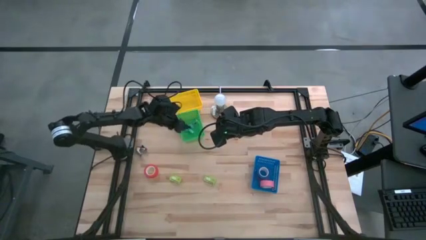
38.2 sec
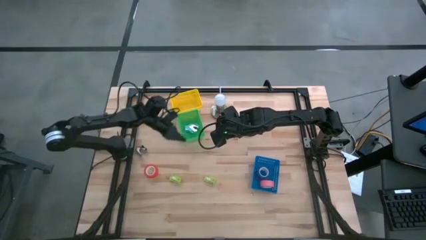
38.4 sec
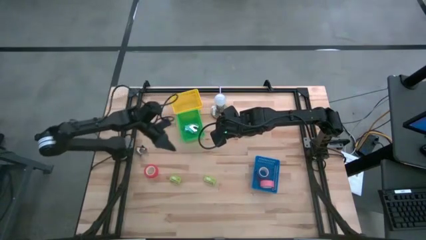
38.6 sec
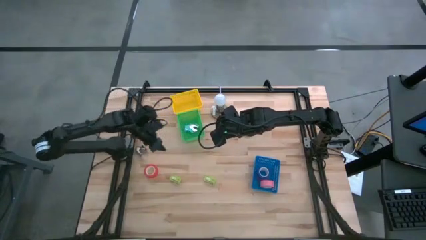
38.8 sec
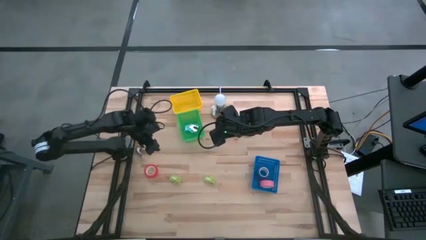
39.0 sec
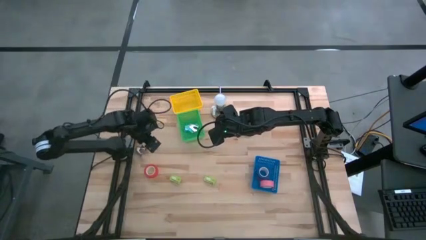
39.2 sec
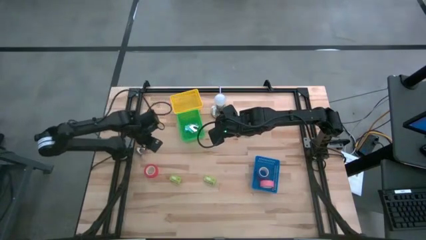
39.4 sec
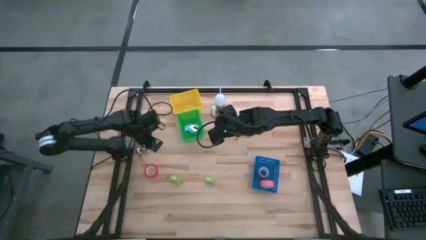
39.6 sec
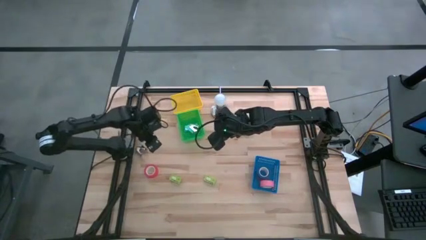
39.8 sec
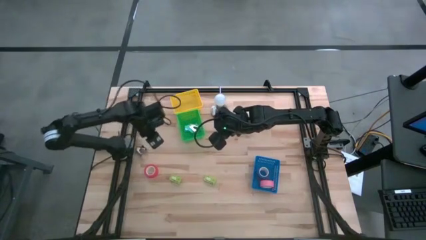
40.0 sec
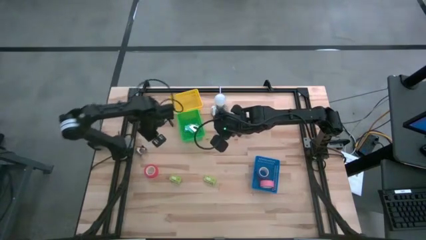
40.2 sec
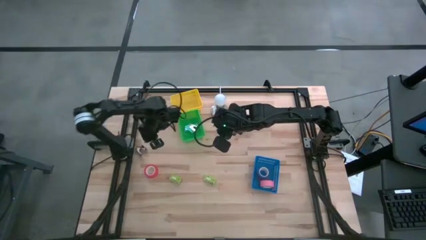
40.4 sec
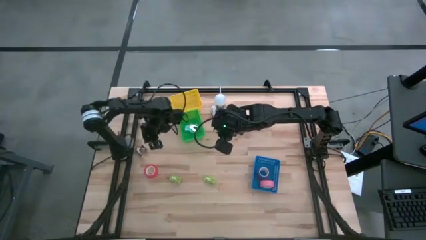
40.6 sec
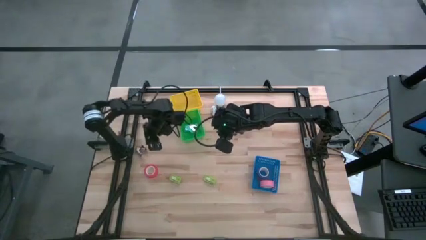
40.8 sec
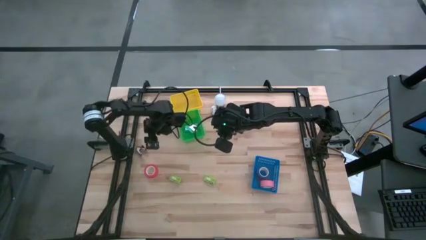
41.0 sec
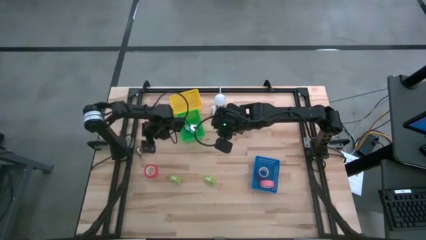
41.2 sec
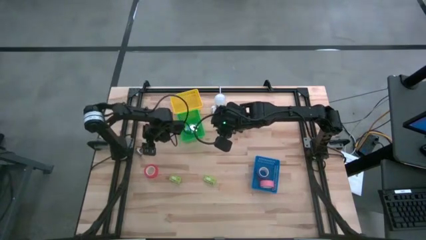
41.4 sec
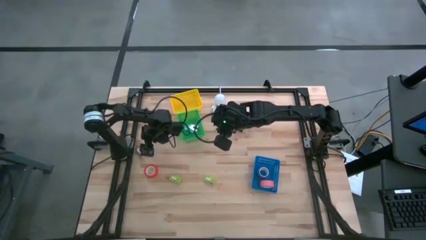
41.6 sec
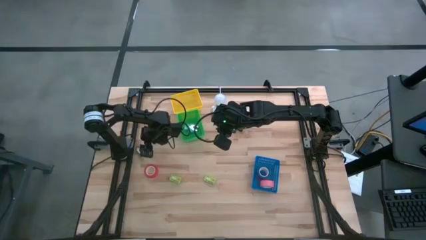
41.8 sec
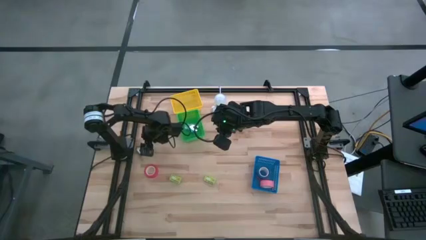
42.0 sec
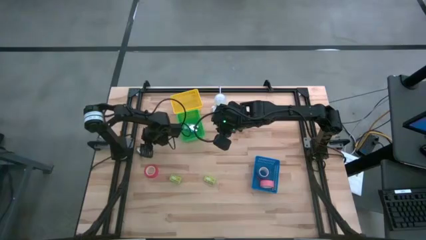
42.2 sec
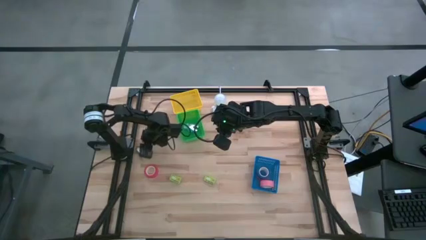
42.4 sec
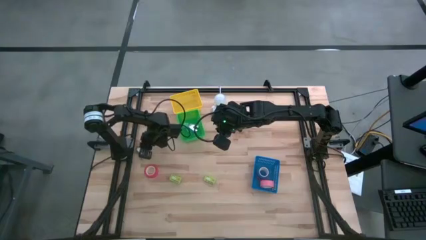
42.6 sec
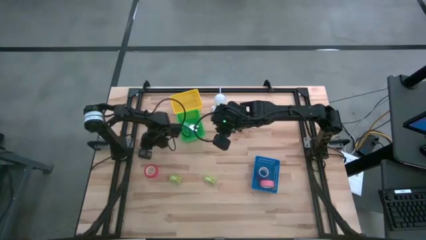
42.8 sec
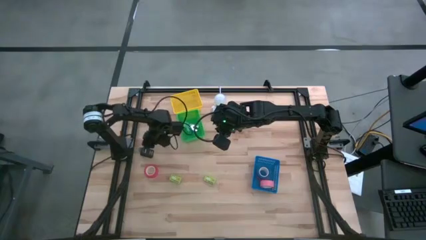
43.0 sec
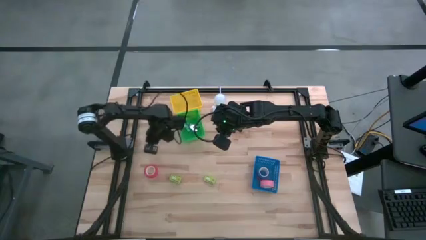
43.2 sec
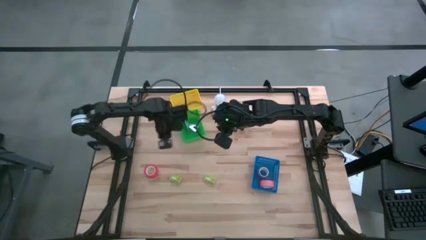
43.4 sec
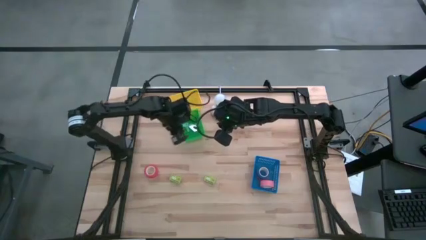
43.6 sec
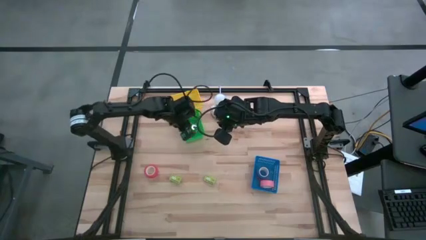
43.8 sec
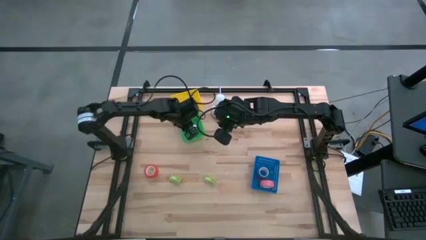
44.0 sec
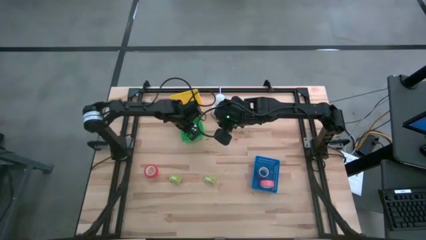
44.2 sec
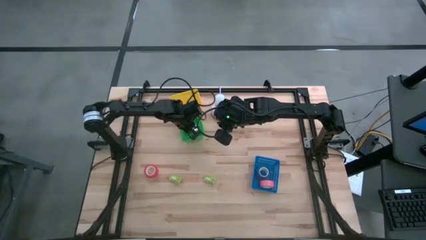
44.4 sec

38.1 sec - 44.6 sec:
Task: Pick and place Stapler, Stapler remover, tape
Put the dark gray staple remover into the green bin

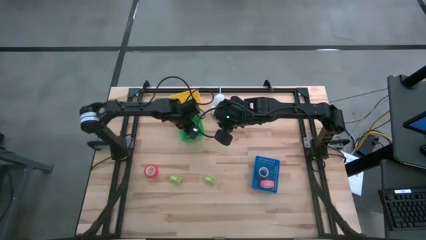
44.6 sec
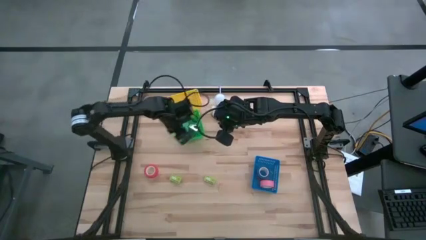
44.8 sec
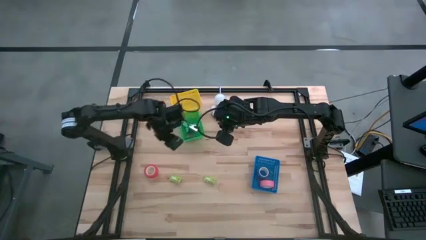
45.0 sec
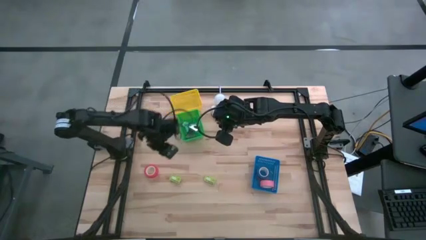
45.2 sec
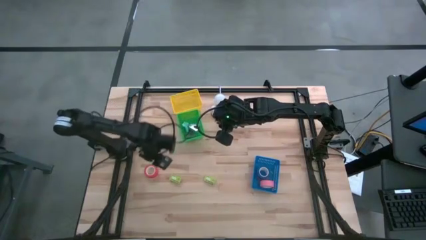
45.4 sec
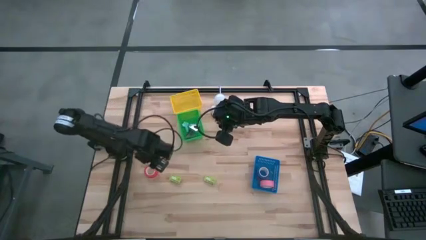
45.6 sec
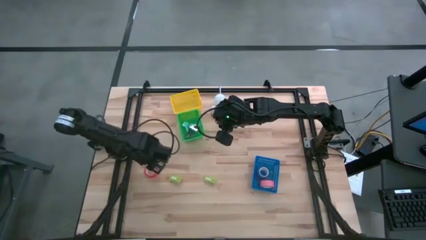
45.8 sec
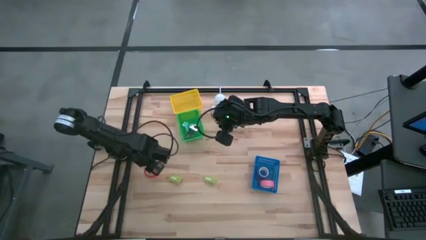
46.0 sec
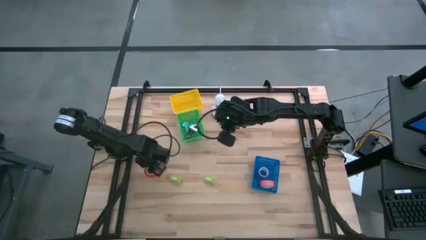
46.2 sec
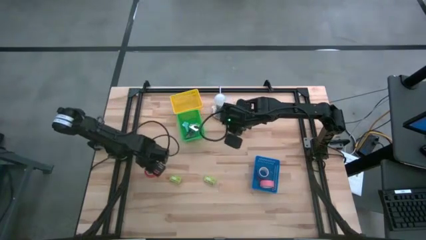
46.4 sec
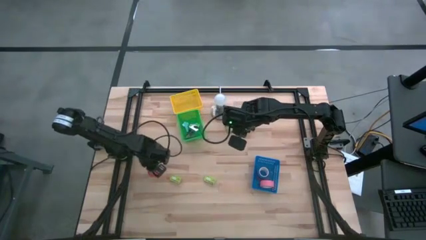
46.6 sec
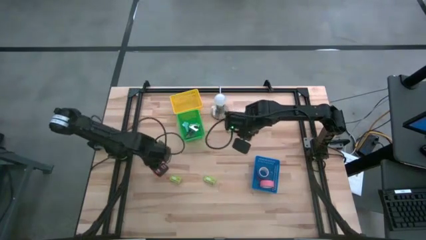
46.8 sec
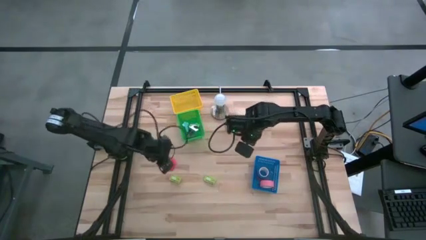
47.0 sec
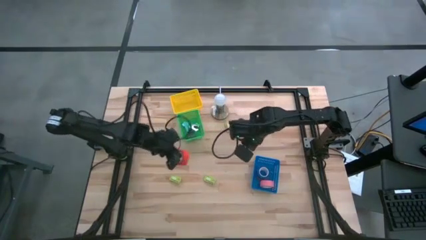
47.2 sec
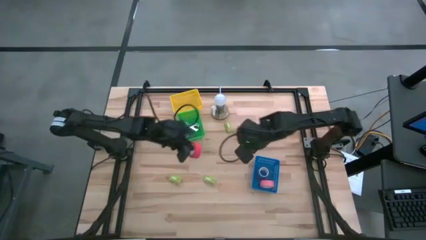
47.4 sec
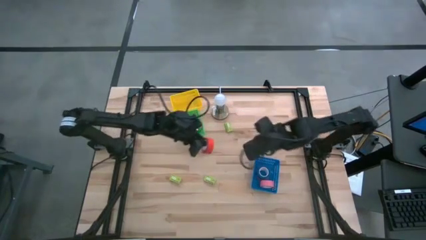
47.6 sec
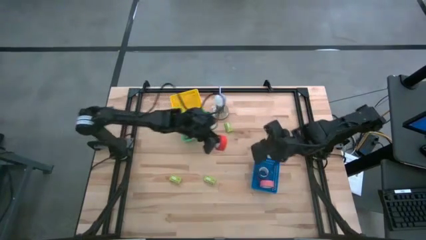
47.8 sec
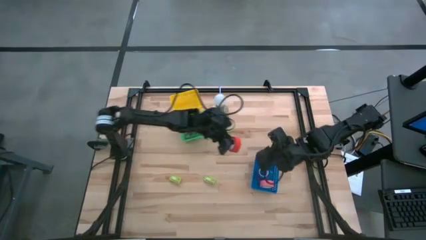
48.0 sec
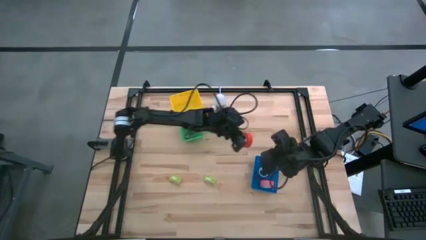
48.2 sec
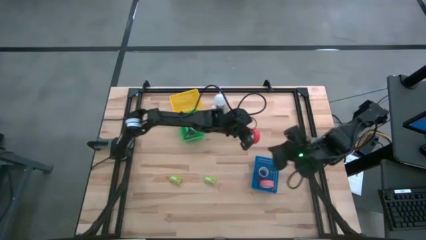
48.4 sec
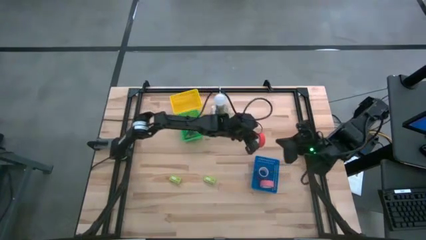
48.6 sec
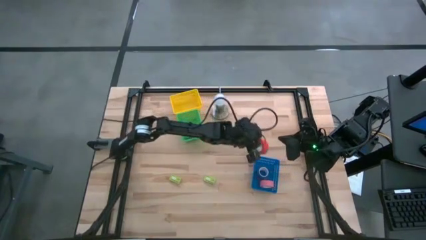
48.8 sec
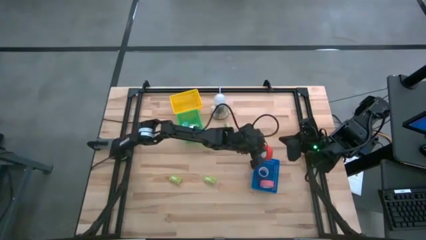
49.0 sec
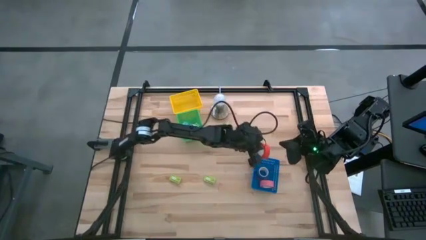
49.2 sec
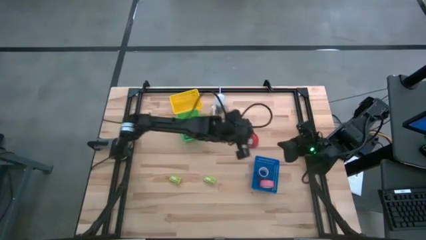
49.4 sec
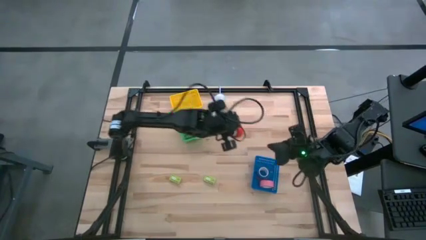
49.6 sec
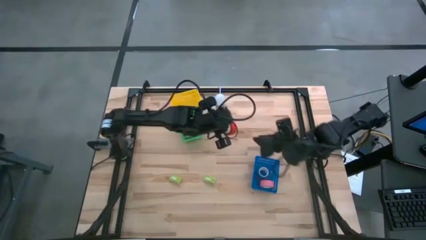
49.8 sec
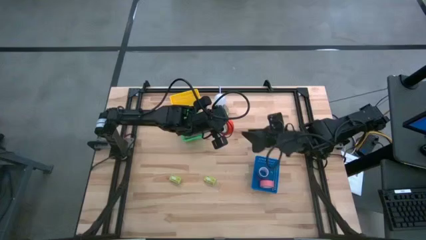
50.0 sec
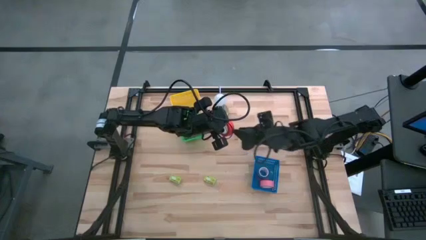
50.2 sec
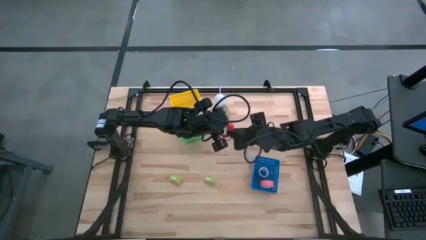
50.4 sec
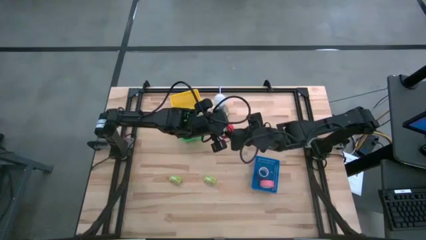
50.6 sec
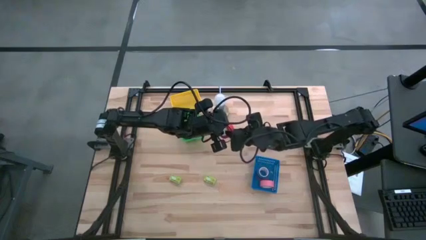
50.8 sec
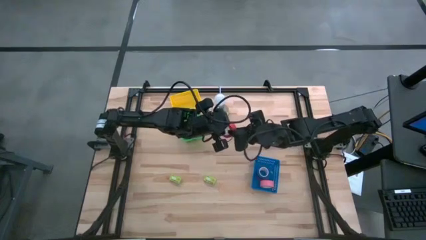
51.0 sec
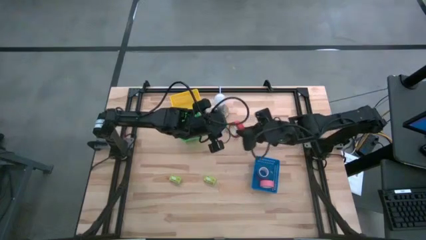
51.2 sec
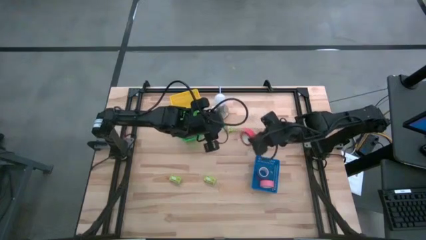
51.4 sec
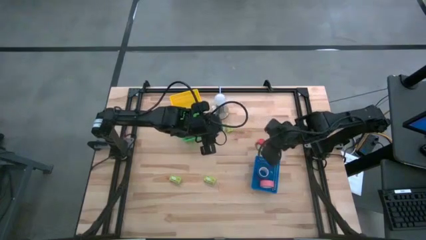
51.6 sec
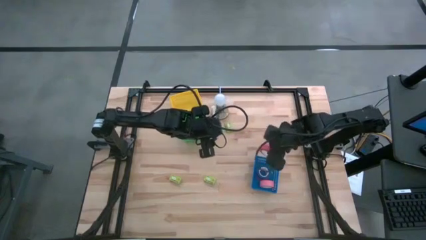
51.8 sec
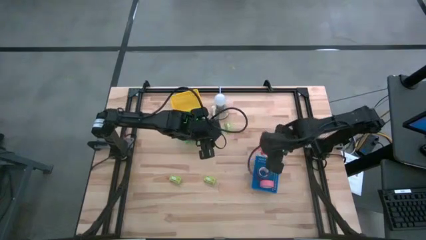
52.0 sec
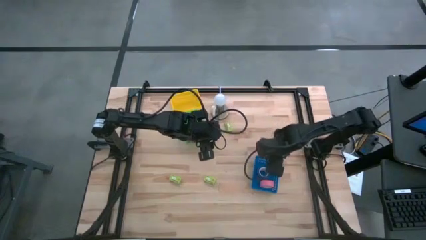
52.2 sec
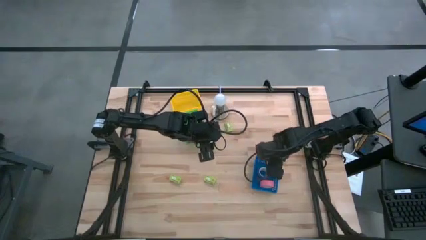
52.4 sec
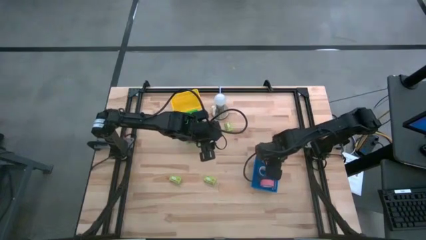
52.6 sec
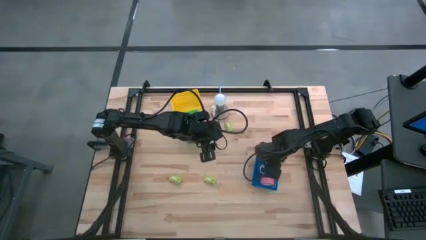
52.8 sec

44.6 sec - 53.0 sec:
Put the orange tape into the blue bin

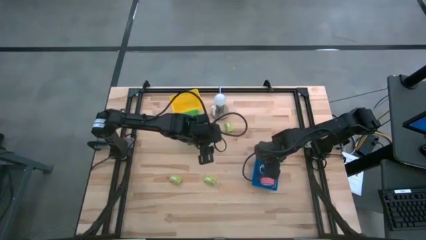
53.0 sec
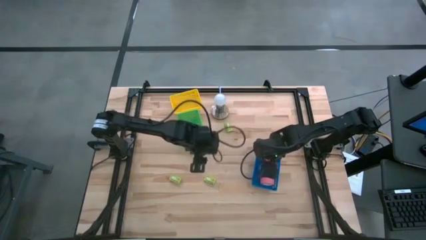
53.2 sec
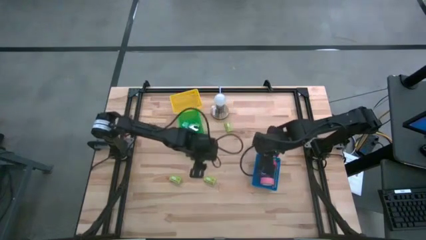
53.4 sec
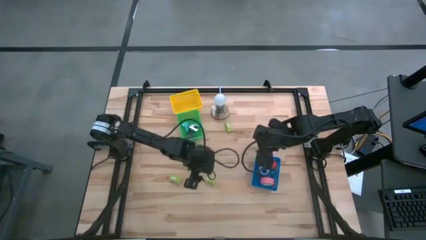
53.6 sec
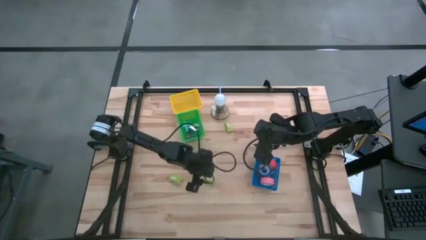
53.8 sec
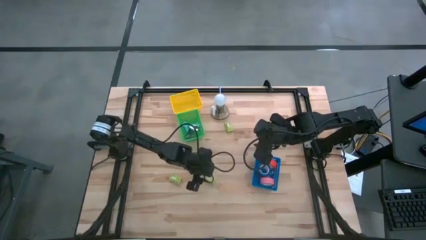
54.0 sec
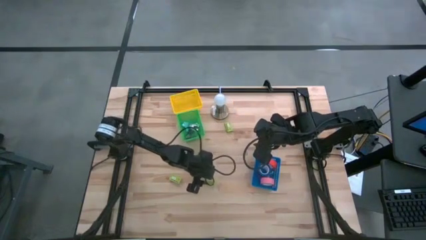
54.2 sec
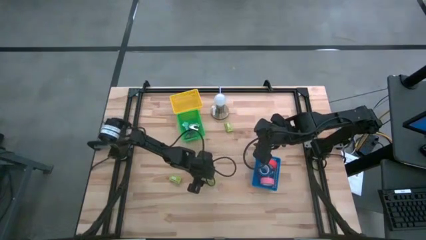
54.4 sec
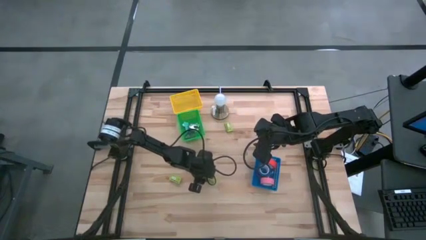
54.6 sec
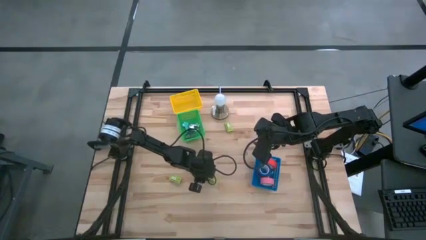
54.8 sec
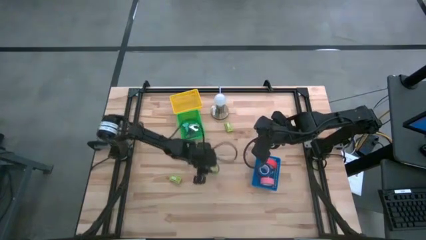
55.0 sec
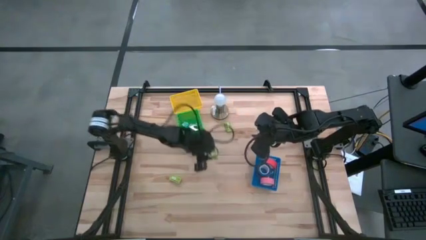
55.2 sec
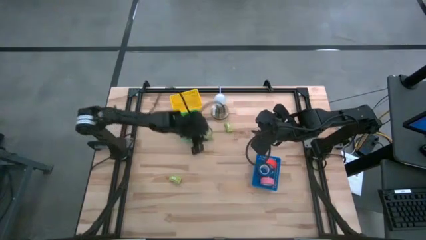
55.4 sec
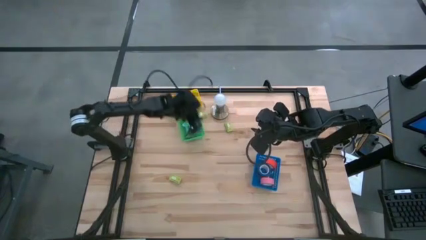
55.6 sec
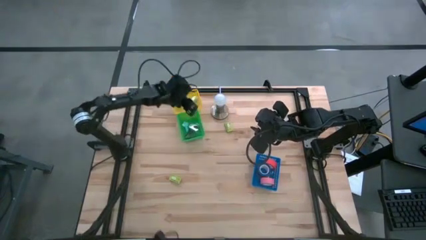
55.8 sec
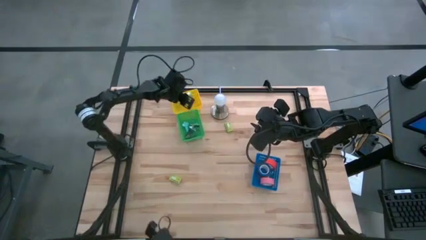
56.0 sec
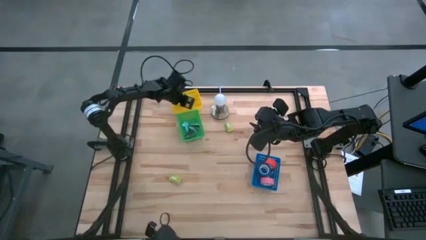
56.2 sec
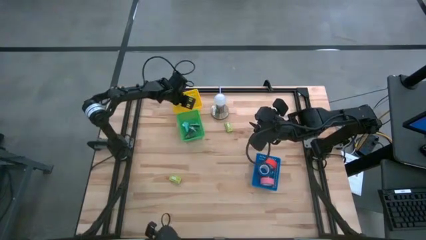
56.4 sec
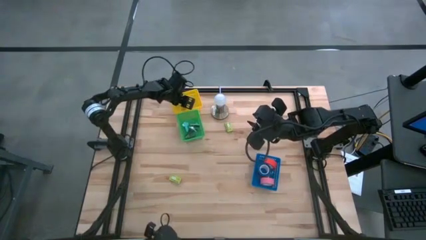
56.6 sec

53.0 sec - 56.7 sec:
Put the light green staple box into the yellow bin
